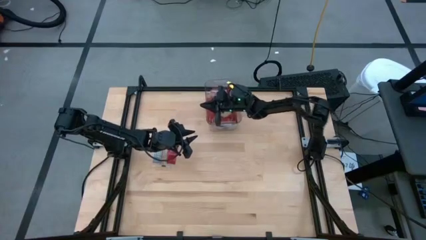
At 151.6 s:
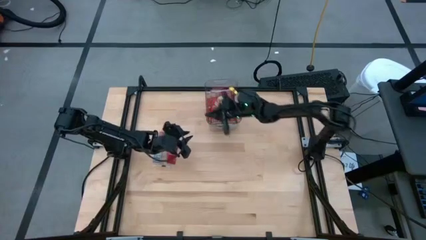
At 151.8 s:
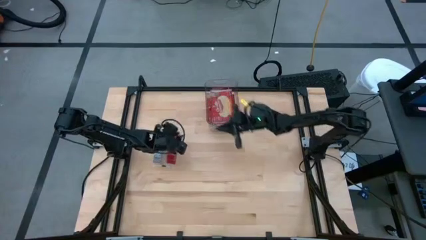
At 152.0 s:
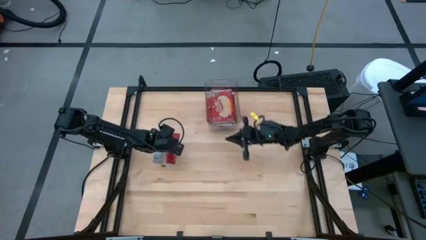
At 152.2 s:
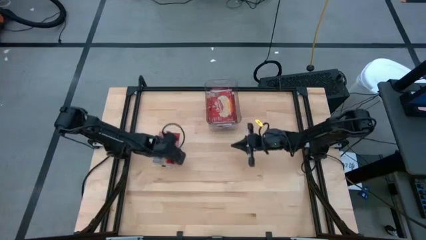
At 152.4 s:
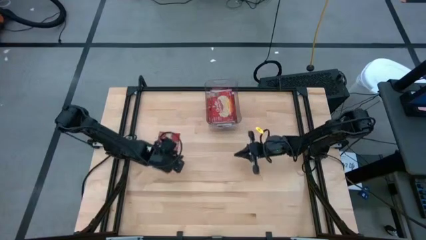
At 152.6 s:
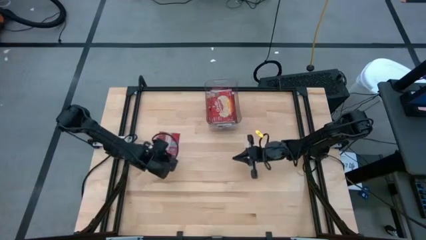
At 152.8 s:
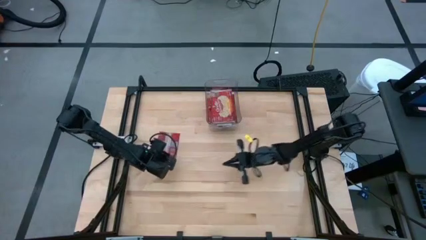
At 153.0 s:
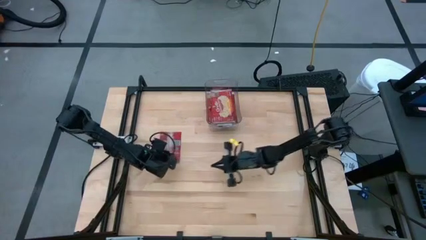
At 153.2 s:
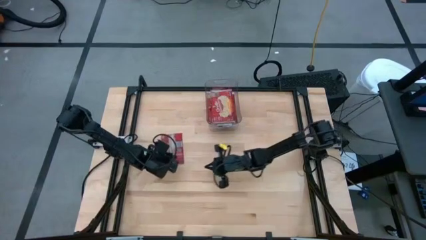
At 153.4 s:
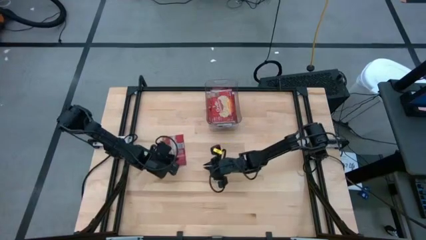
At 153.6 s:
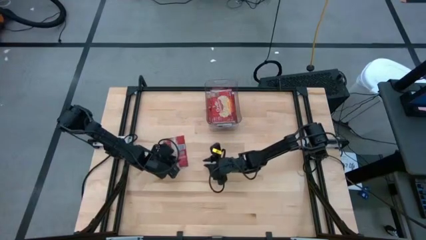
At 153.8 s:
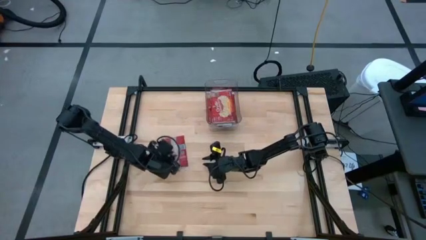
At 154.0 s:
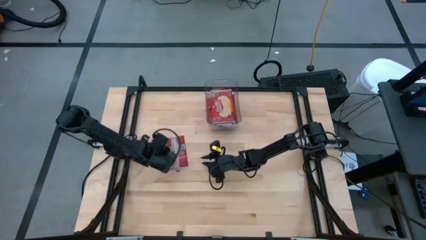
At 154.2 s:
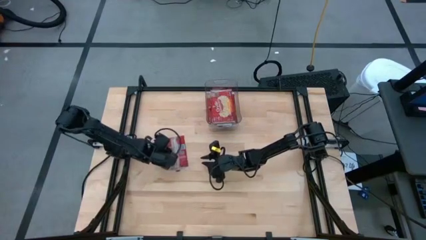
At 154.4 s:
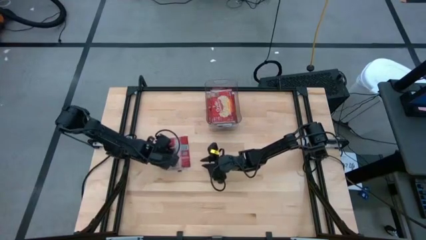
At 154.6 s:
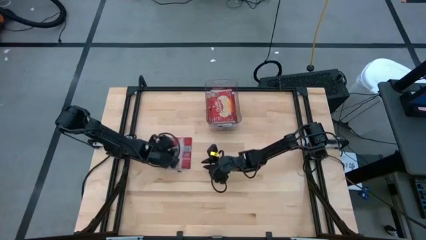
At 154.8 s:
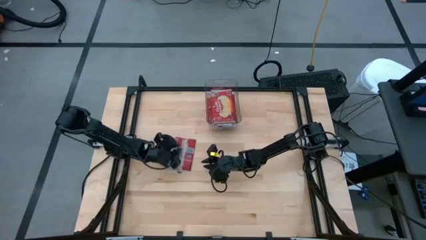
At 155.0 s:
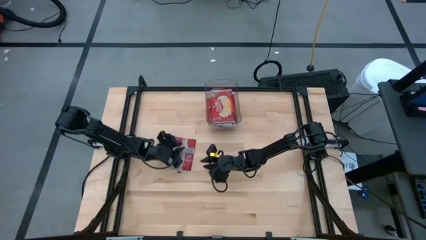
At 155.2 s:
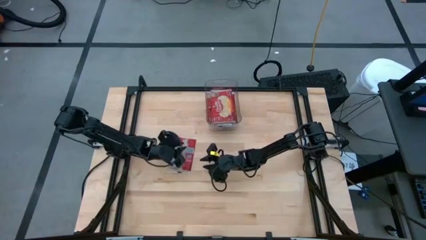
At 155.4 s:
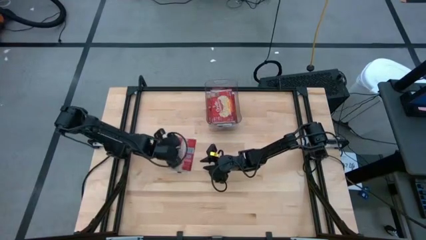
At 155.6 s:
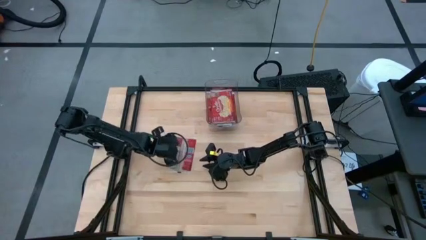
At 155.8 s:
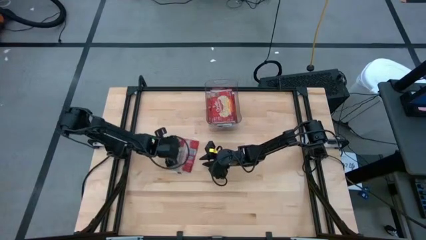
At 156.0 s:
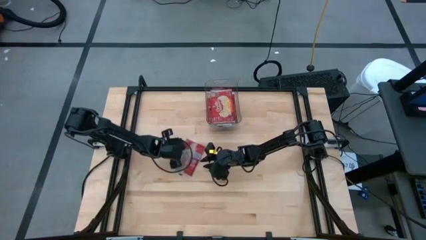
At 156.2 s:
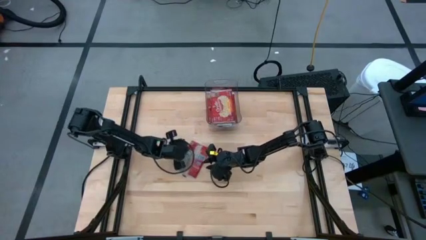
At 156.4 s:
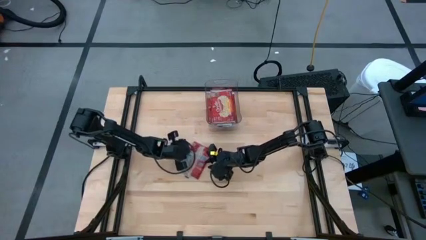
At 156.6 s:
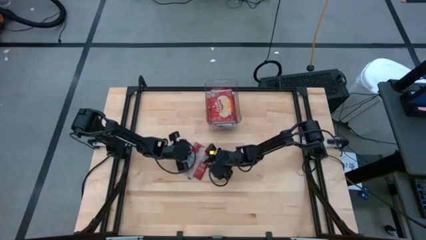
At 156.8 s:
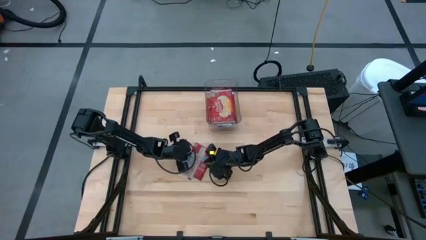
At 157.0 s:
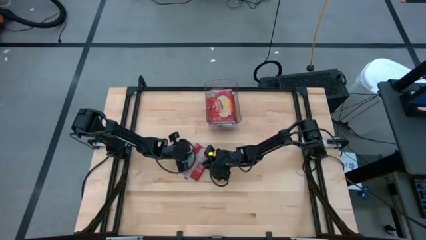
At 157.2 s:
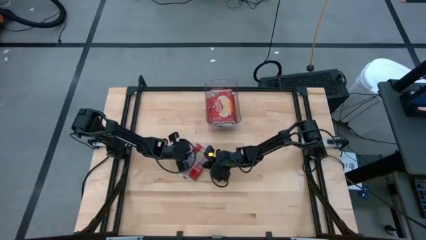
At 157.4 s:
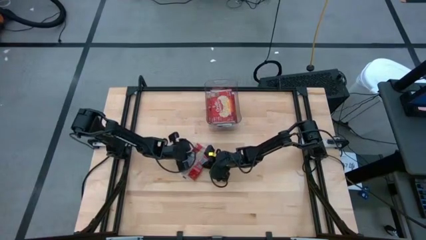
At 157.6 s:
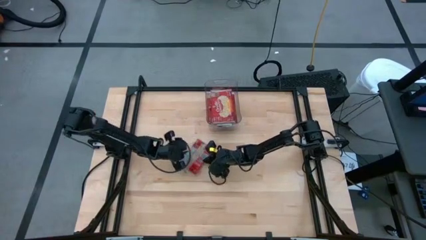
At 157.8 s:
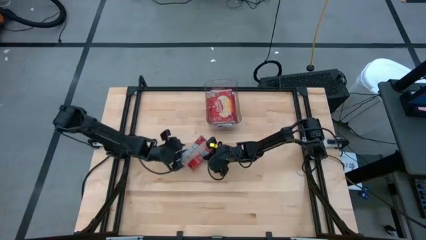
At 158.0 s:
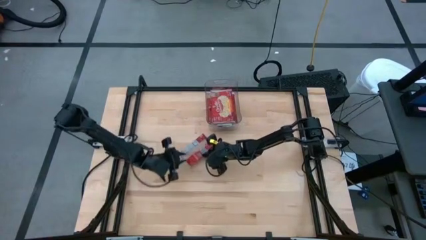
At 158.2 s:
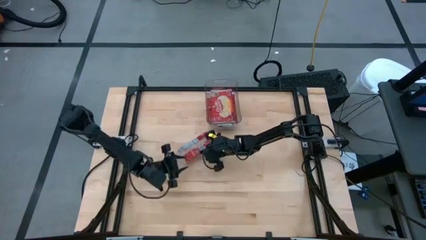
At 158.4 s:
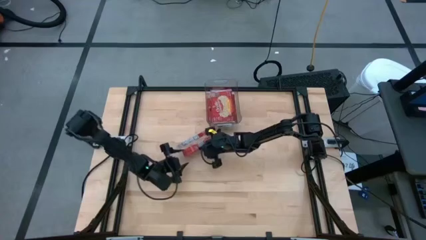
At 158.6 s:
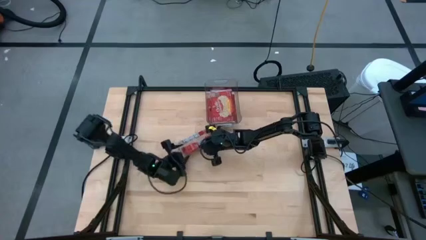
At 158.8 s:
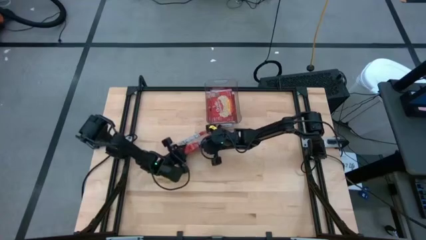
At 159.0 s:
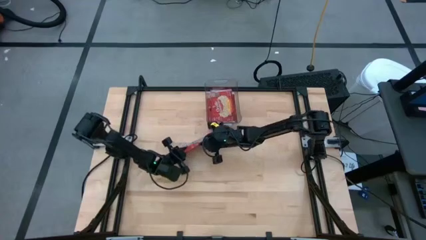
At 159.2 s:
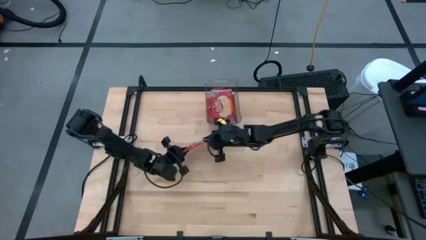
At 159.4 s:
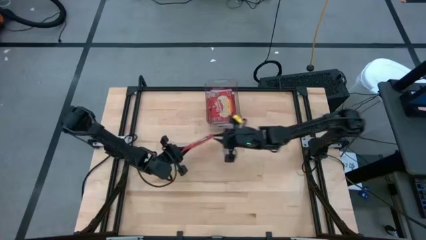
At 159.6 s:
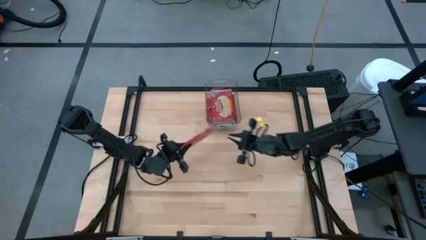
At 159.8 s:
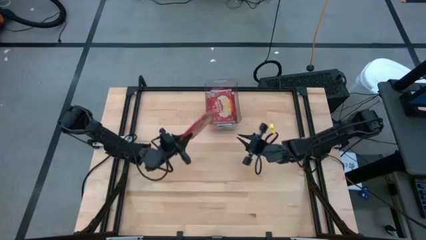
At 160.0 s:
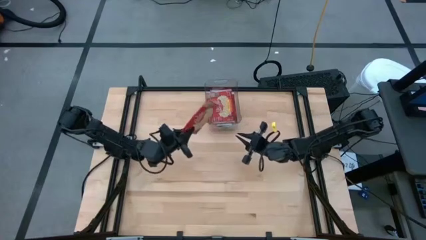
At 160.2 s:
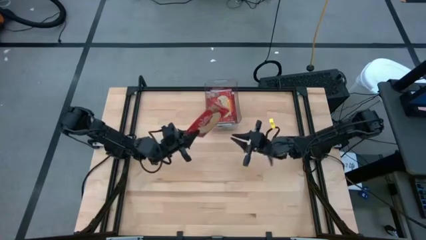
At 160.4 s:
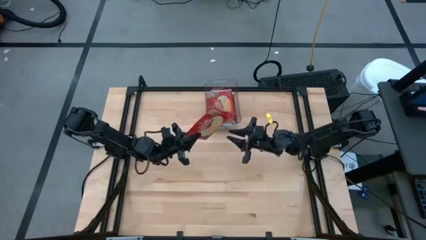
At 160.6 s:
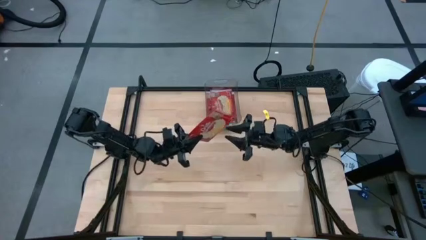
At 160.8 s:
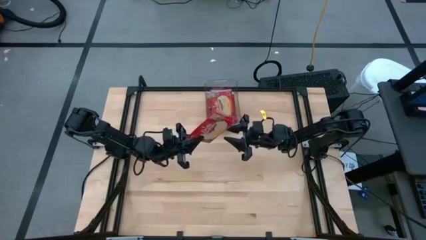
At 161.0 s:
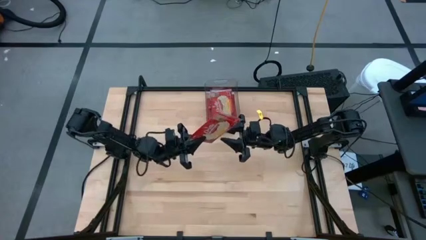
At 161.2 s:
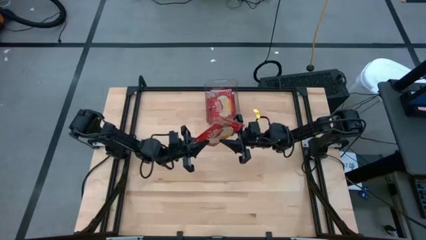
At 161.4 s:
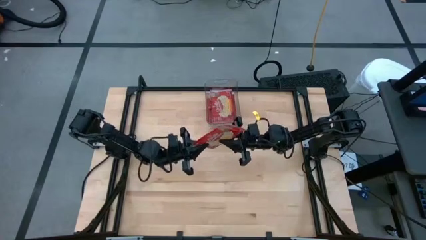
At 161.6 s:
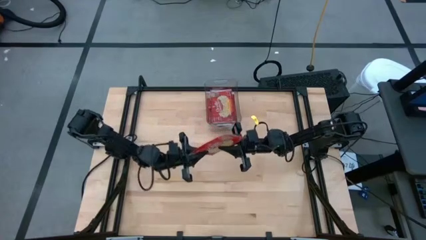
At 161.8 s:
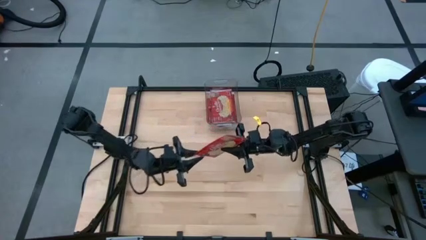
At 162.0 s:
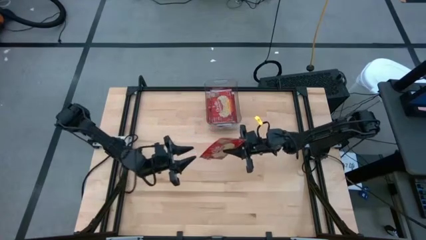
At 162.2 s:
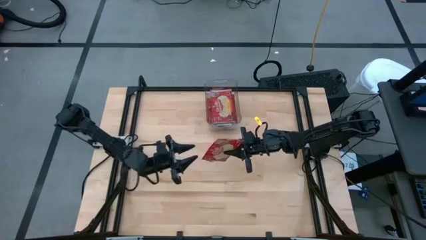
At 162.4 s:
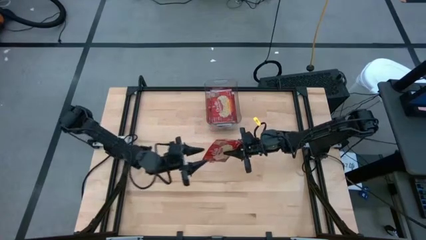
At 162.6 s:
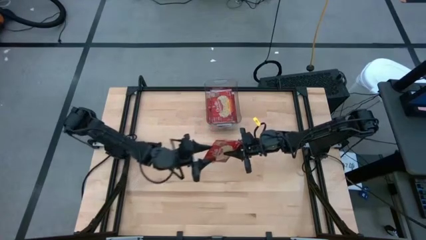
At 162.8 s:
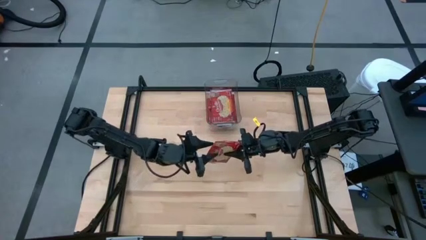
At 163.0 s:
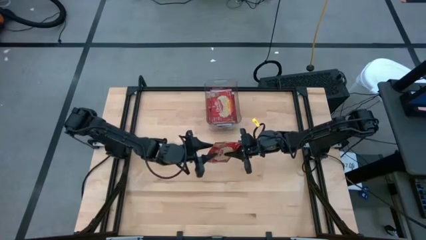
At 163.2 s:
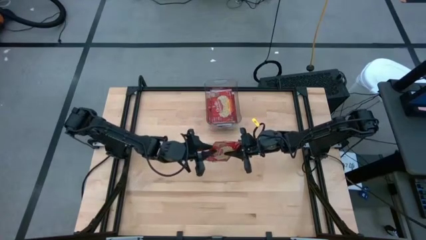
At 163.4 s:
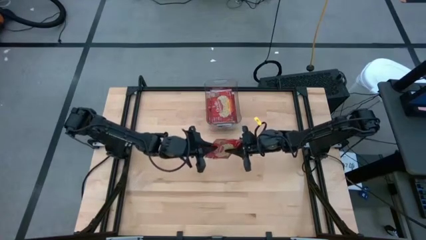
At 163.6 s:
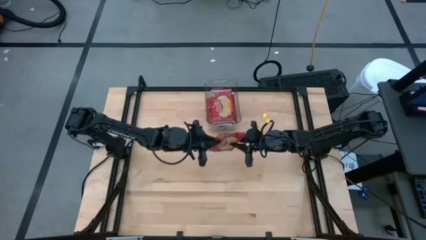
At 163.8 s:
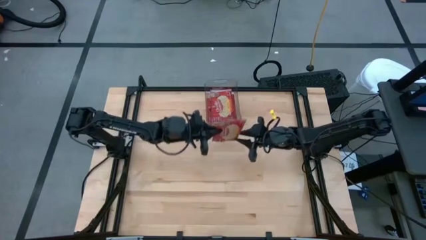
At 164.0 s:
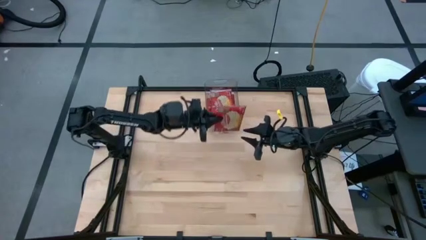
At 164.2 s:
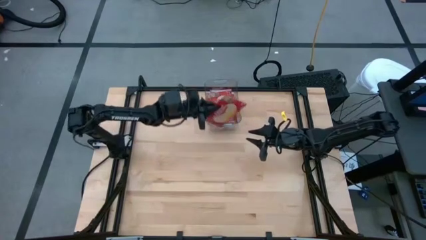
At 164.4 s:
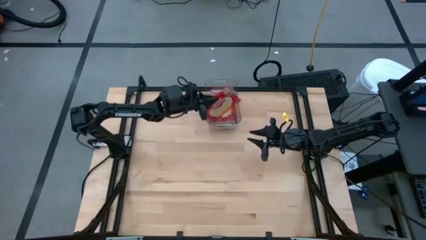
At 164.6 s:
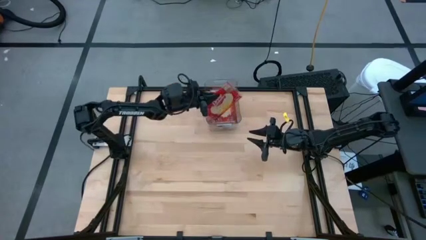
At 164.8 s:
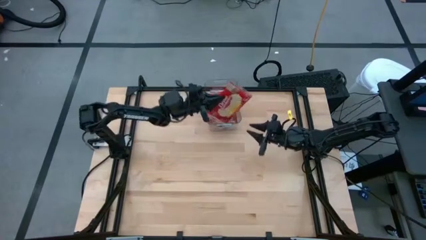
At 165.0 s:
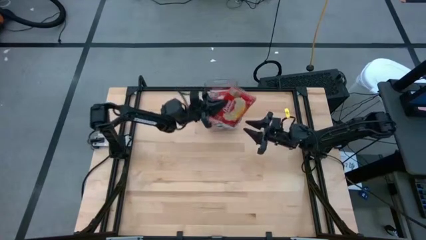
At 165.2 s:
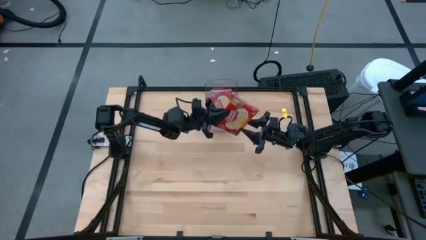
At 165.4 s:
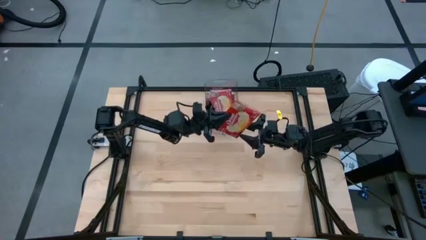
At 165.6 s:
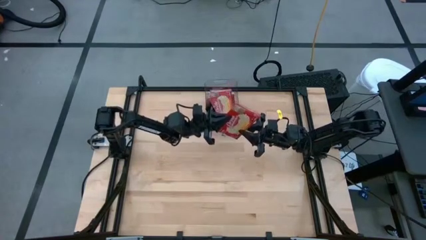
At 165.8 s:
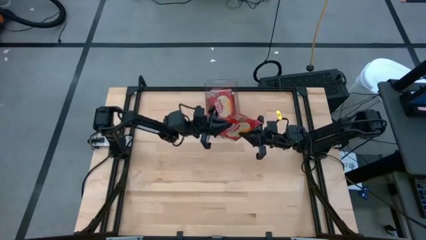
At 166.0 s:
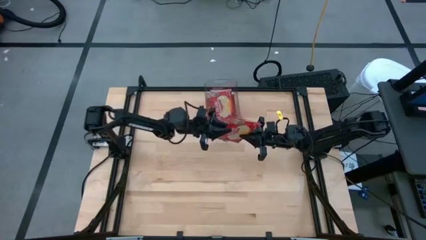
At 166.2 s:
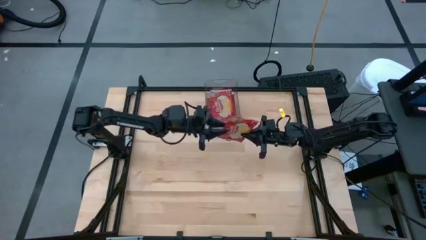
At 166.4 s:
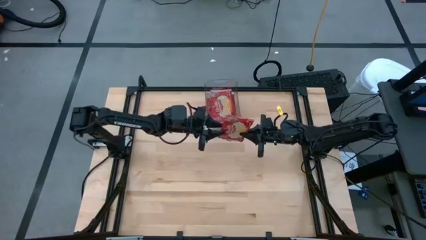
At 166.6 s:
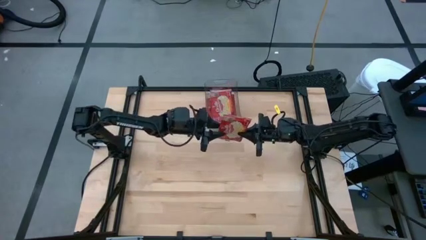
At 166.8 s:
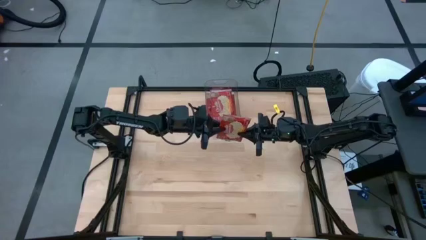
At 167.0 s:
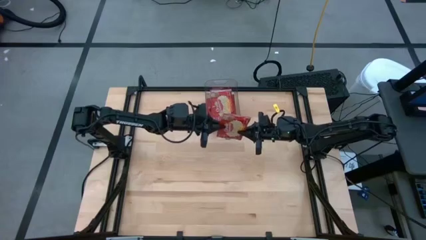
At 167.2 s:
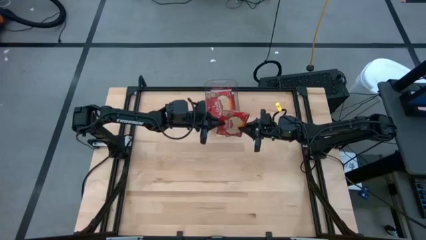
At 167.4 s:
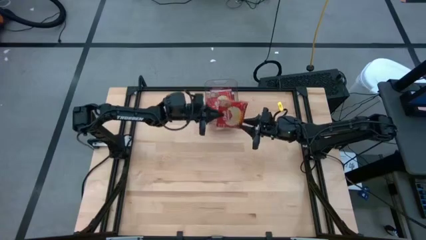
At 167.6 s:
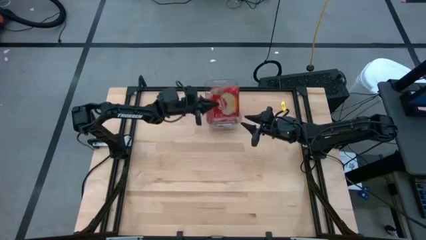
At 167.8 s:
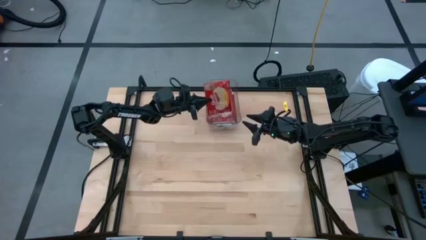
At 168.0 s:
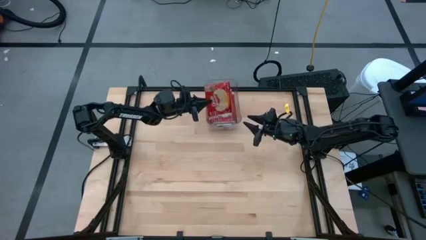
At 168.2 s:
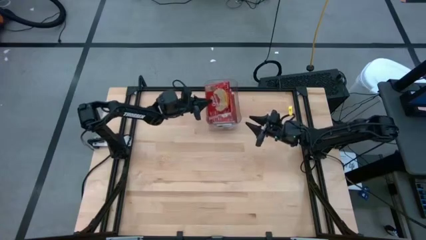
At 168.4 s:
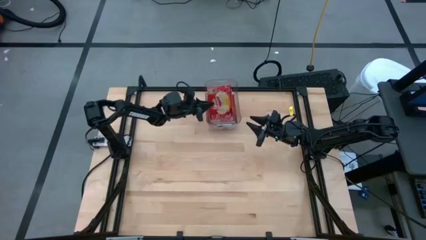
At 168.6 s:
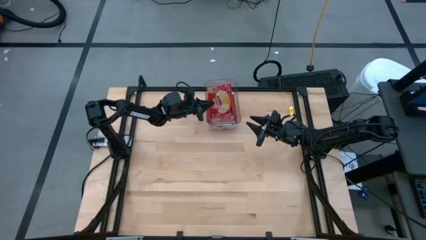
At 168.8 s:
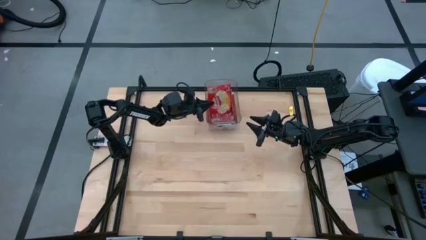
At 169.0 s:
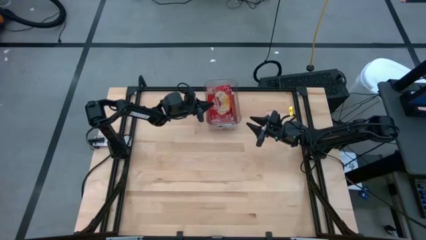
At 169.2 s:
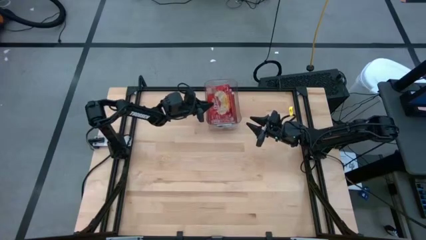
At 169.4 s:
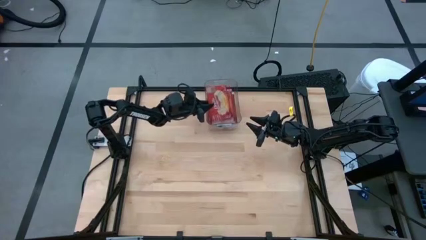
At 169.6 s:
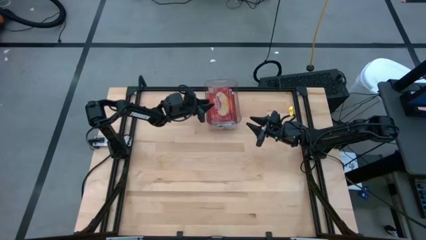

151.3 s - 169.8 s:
Task: Sort popcorn bags into baskets
Put the red popcorn pack into the transparent bin
